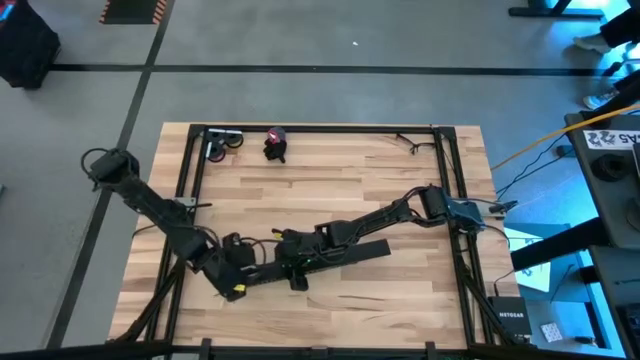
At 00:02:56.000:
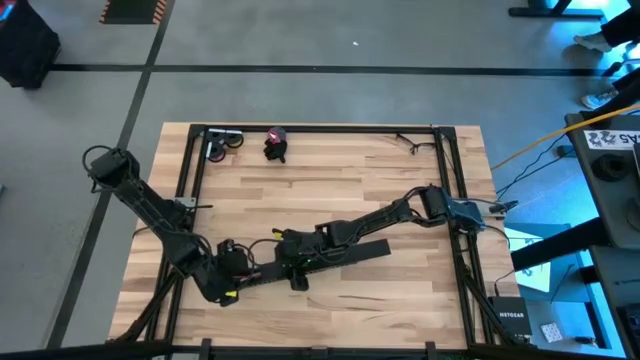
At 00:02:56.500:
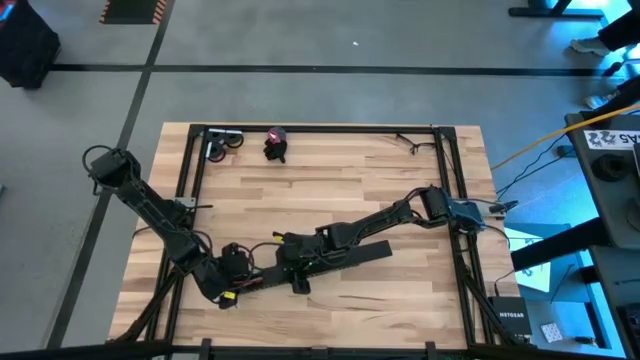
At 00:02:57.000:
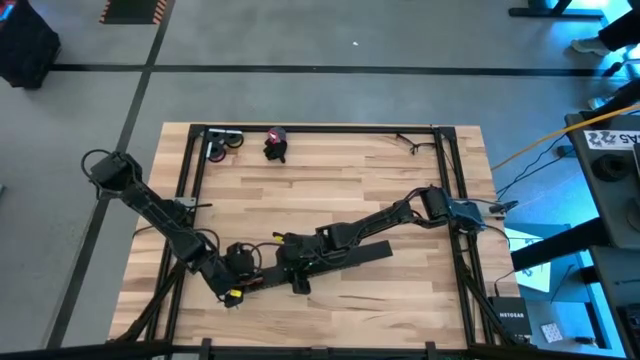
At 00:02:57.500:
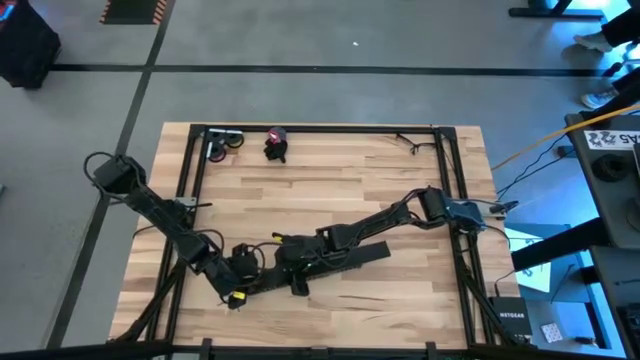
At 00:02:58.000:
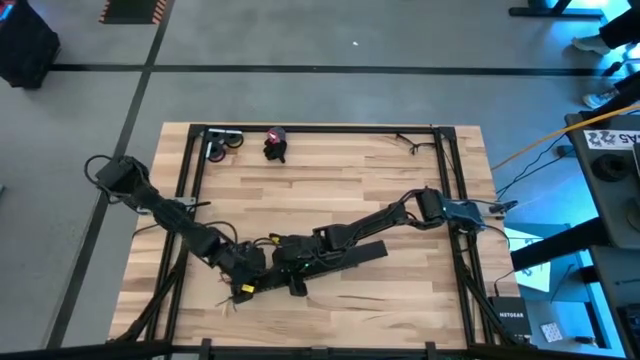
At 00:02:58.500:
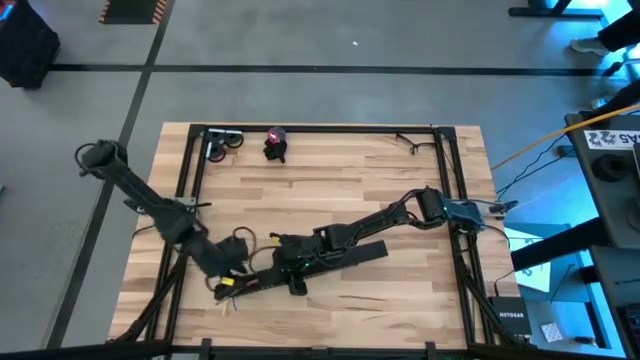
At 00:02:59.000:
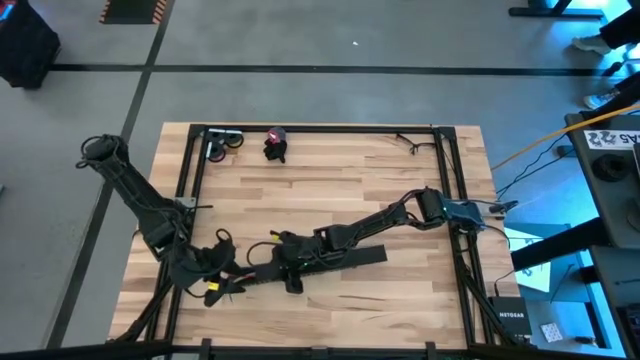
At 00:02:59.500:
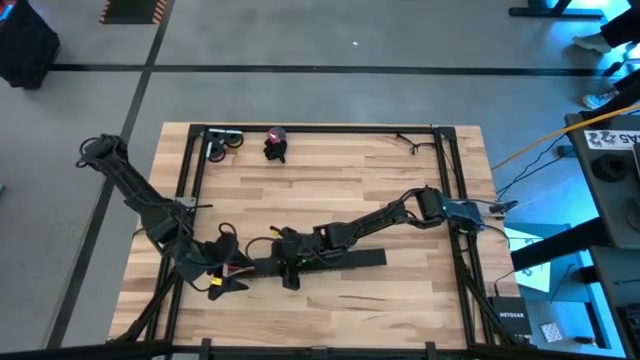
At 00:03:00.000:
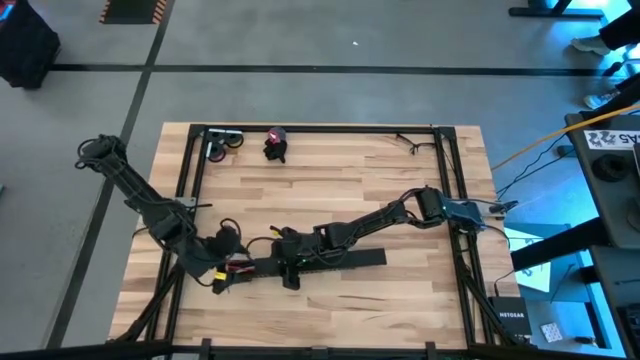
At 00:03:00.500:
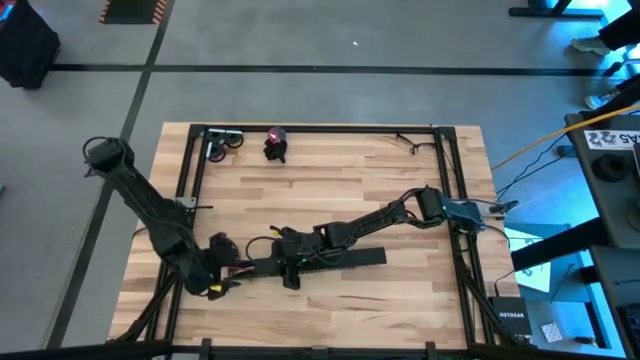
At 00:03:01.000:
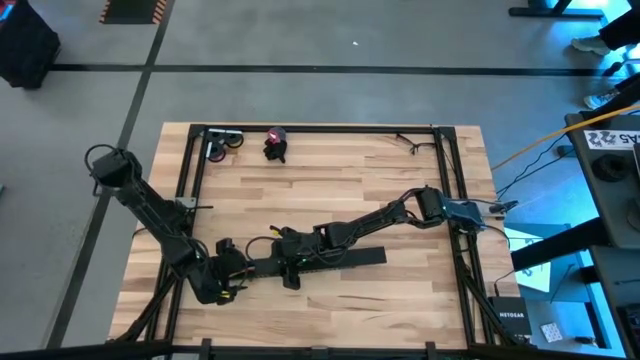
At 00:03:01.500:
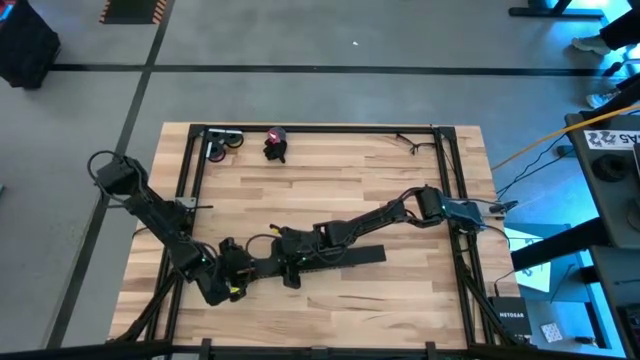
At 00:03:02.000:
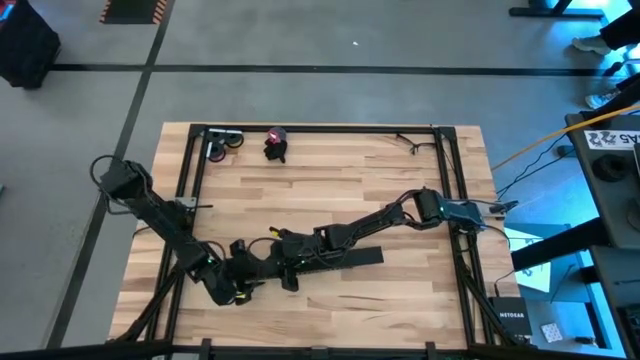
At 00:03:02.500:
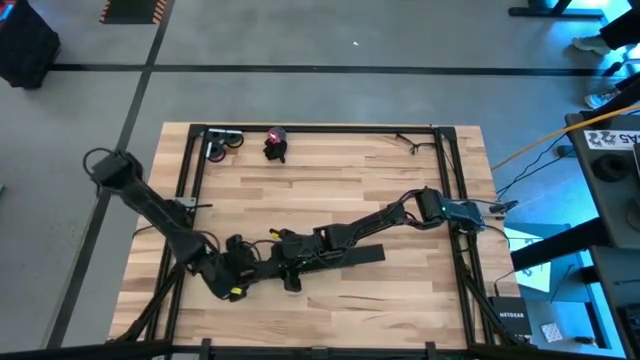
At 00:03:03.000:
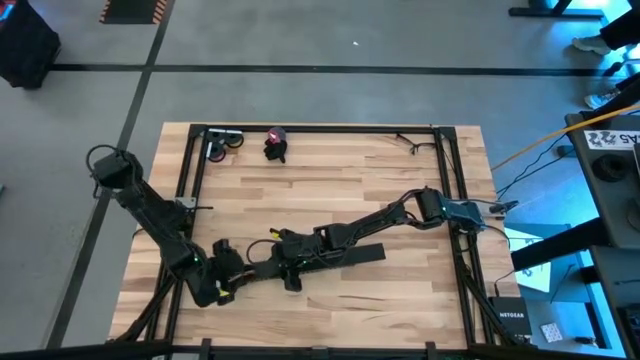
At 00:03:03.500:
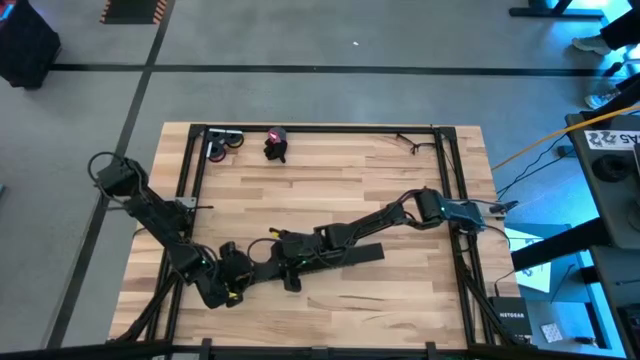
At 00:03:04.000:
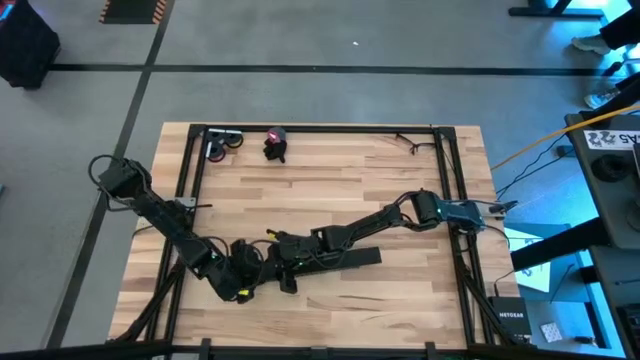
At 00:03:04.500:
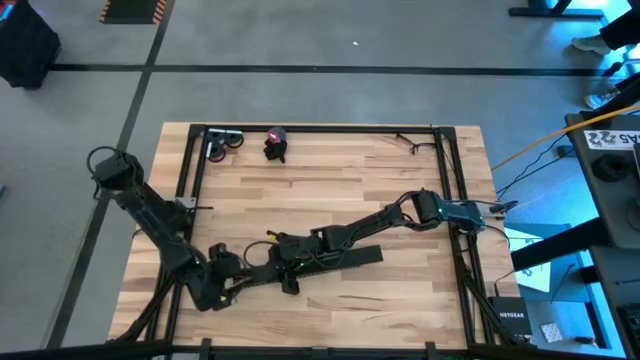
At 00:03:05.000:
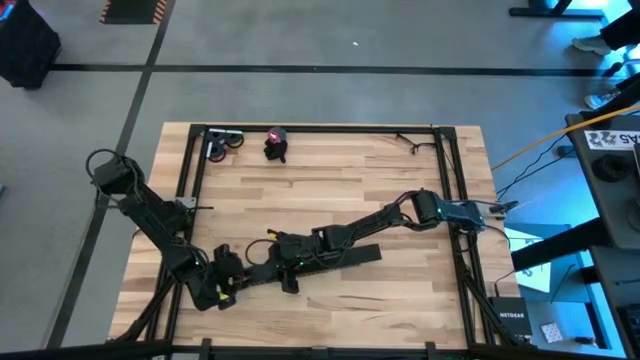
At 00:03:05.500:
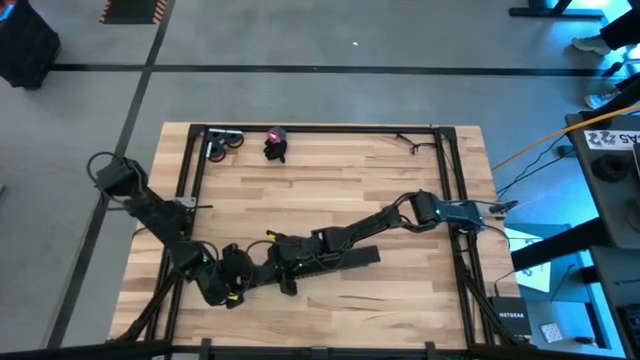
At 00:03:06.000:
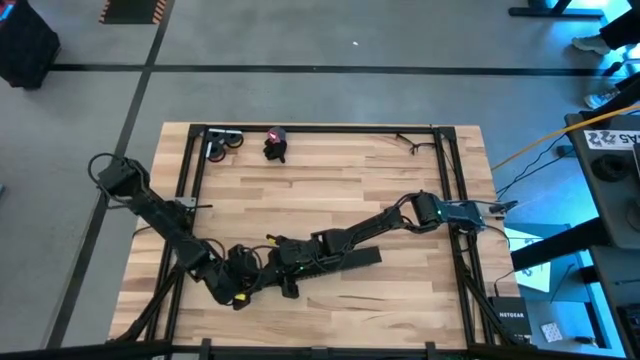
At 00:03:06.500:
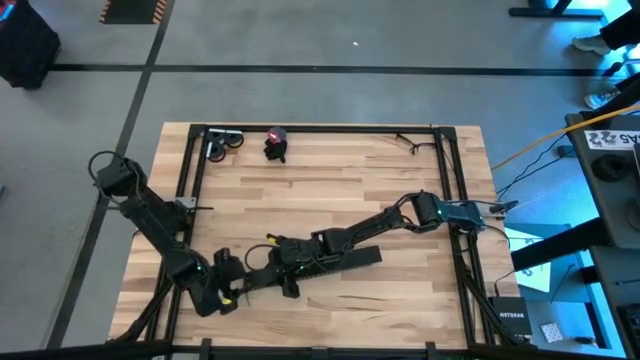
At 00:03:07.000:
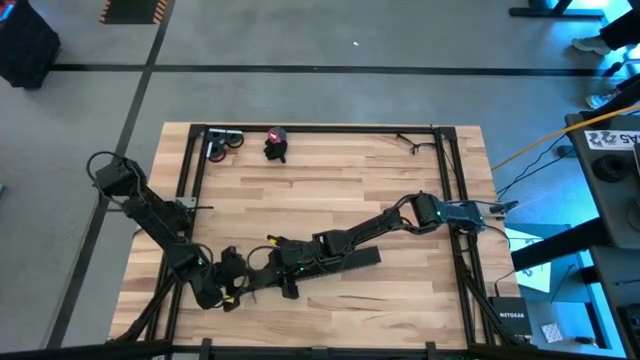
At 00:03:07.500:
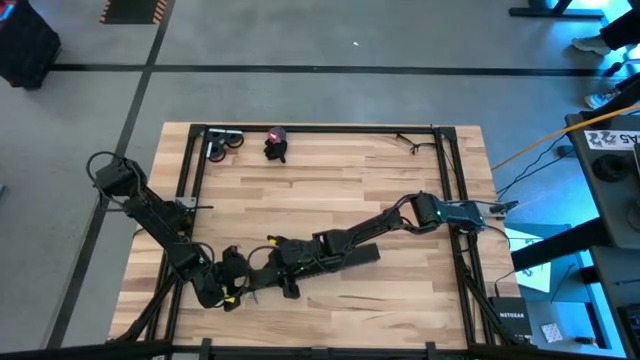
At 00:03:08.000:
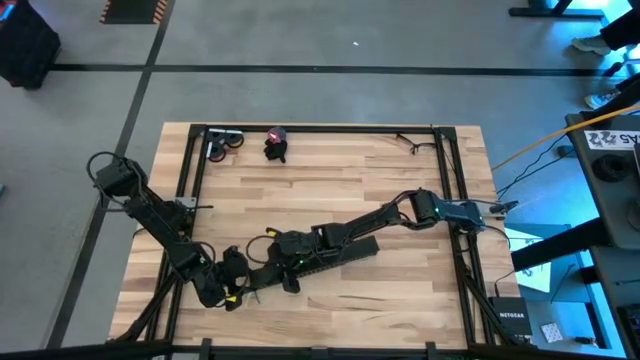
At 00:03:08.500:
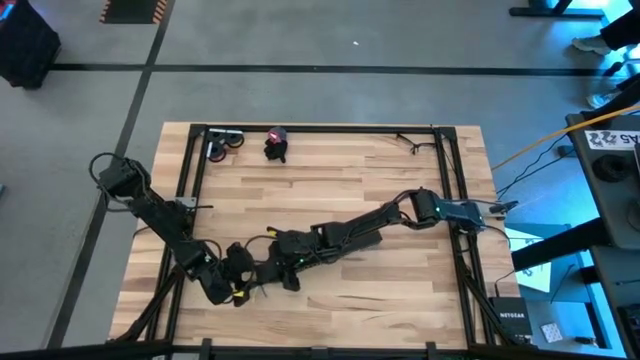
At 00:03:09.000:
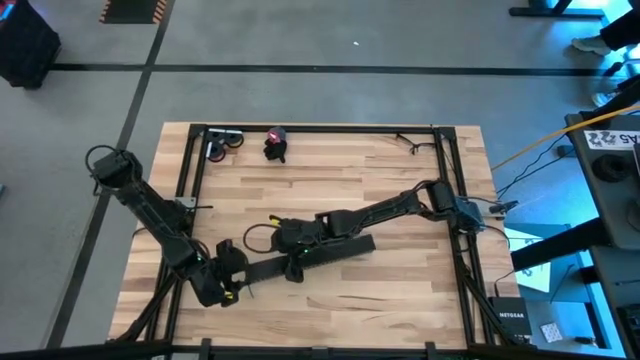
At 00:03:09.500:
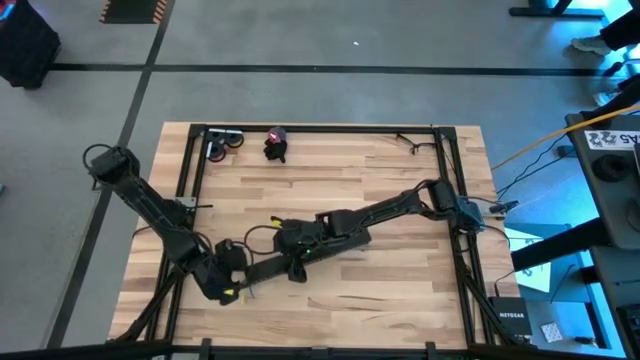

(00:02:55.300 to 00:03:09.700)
Task: Ziptie cables
Close the black cable duct using the black cable duct lid

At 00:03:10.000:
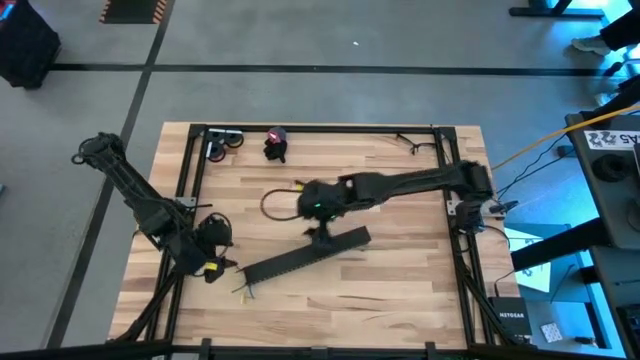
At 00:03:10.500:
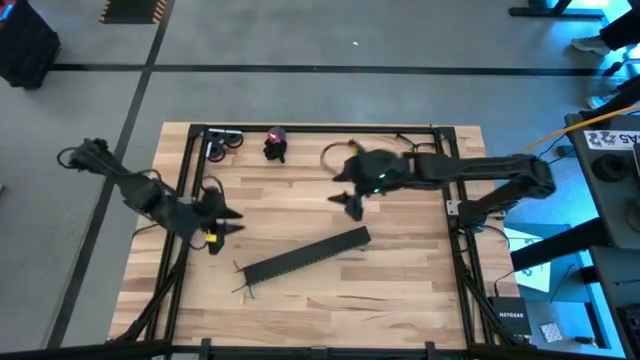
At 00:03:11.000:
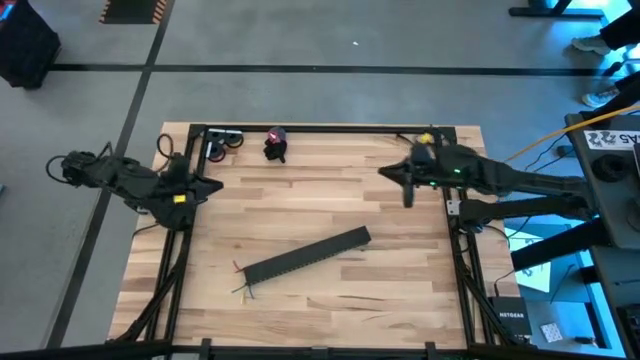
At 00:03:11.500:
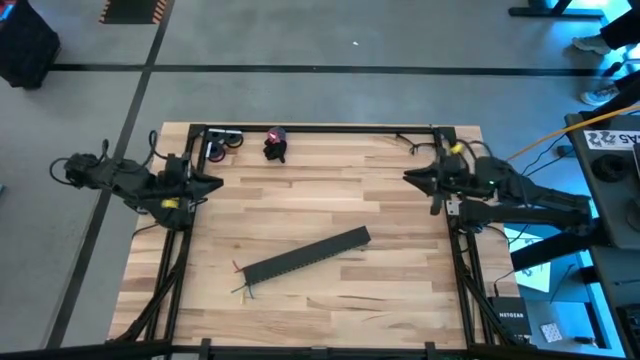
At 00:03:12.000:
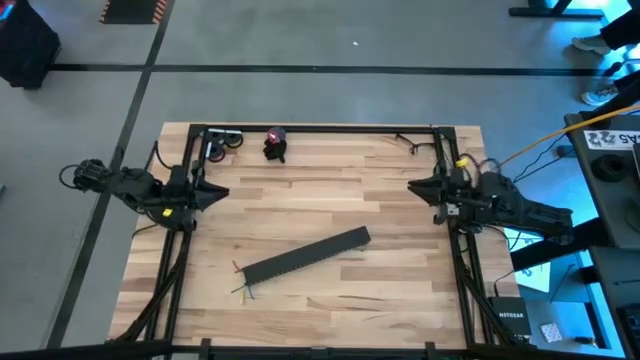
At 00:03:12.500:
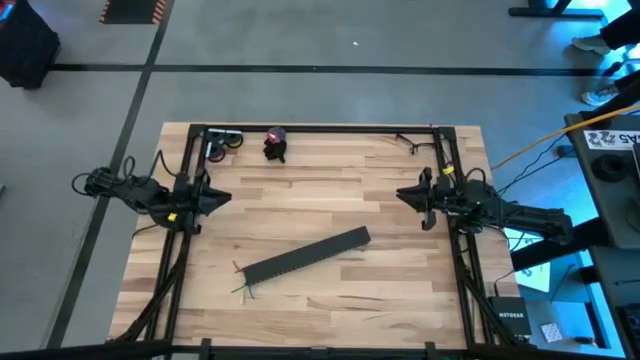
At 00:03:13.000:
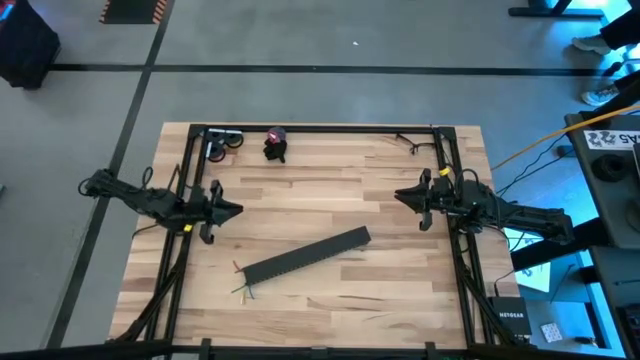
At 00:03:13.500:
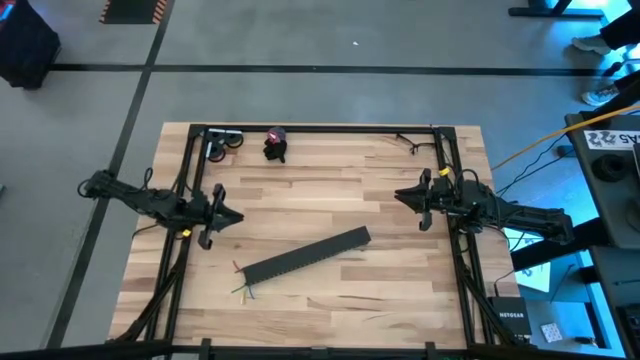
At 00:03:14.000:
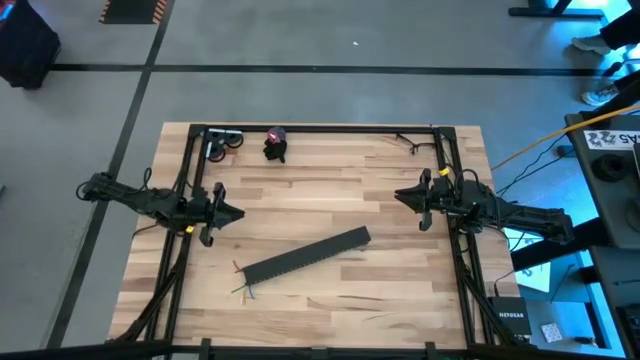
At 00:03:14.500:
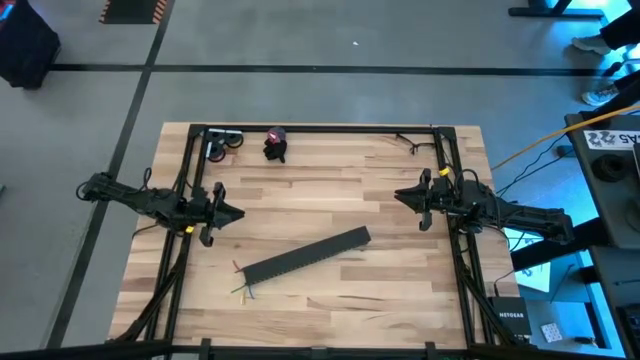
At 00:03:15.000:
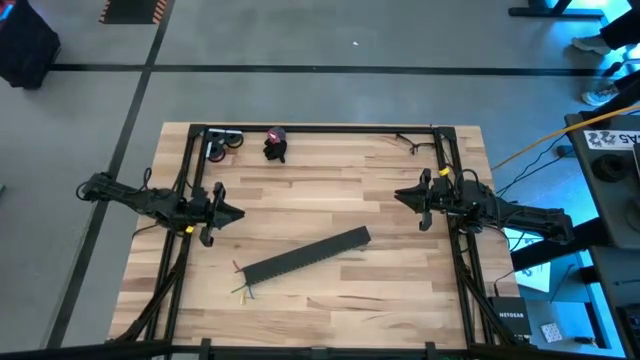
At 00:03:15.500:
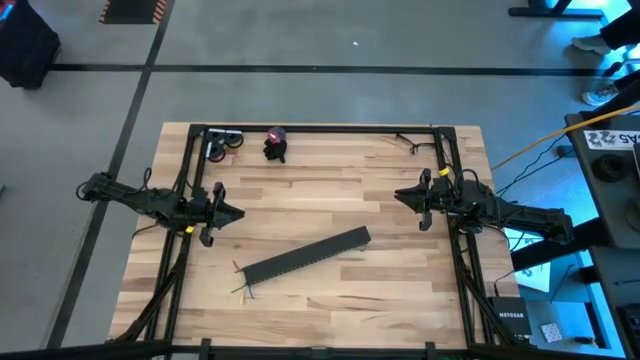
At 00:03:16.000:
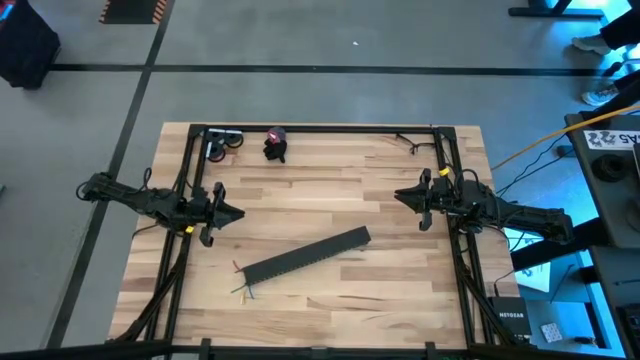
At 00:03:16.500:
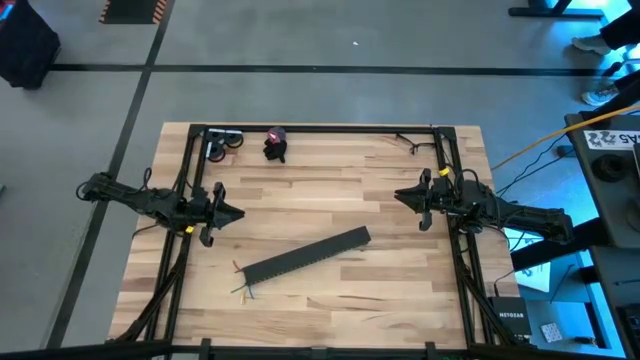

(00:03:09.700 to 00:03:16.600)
Return to Home Position
